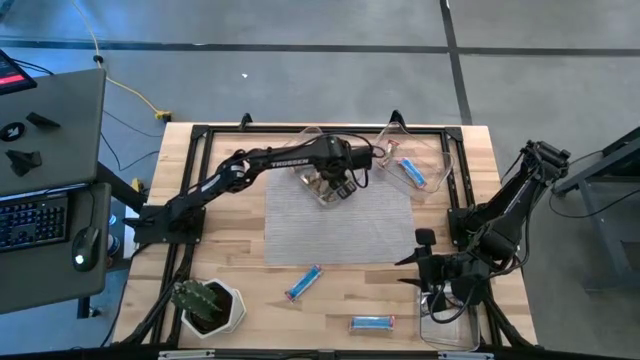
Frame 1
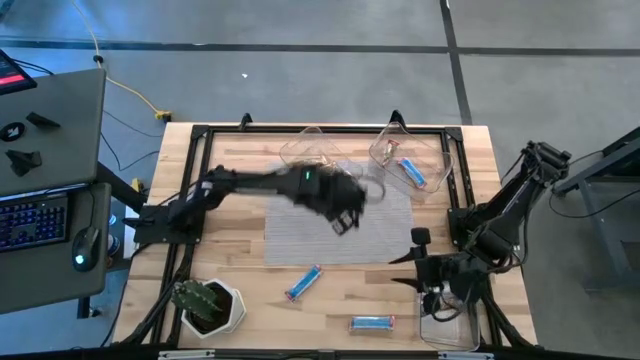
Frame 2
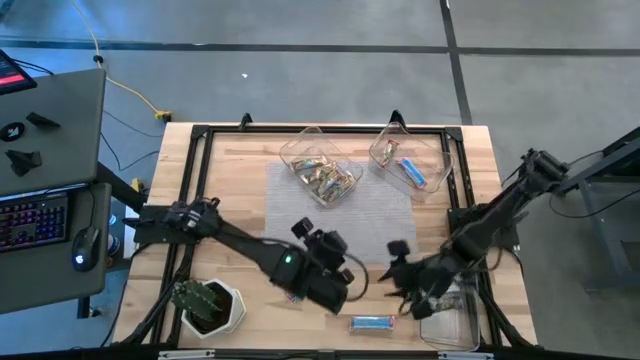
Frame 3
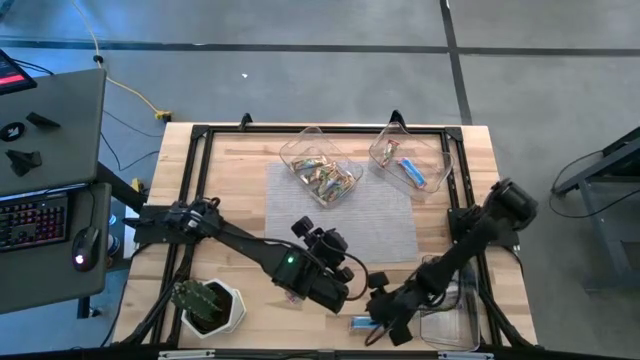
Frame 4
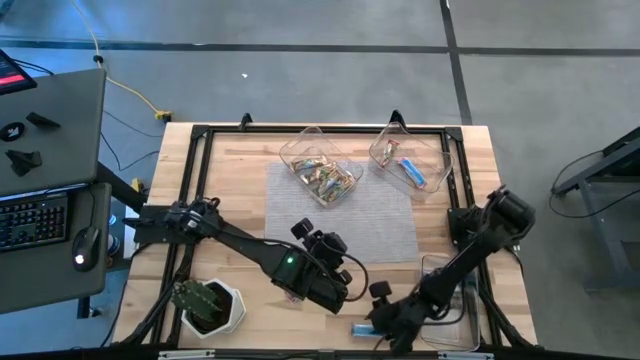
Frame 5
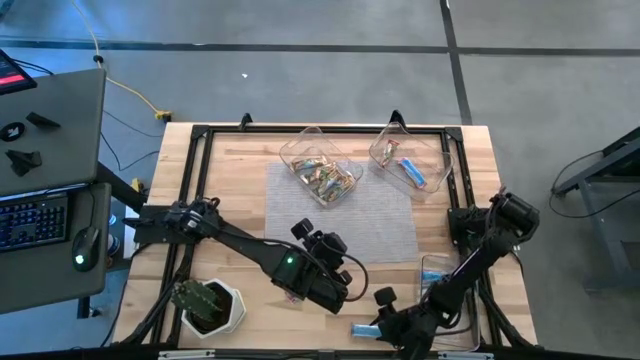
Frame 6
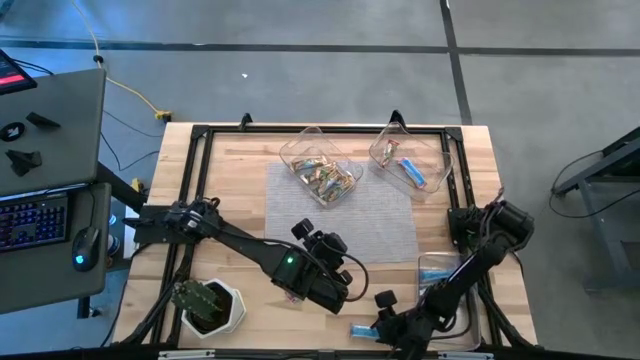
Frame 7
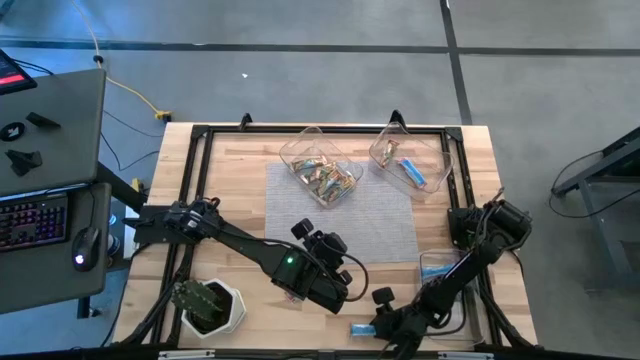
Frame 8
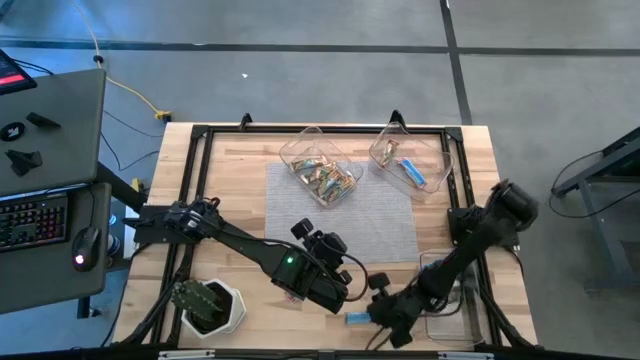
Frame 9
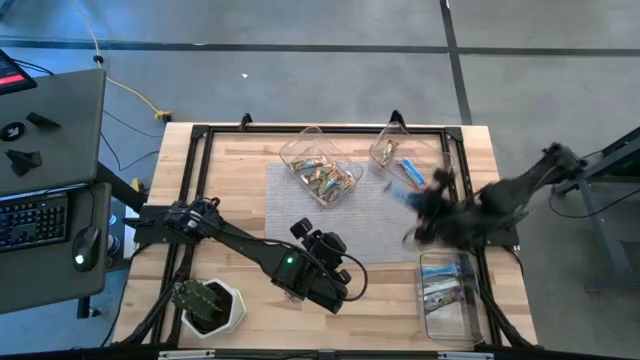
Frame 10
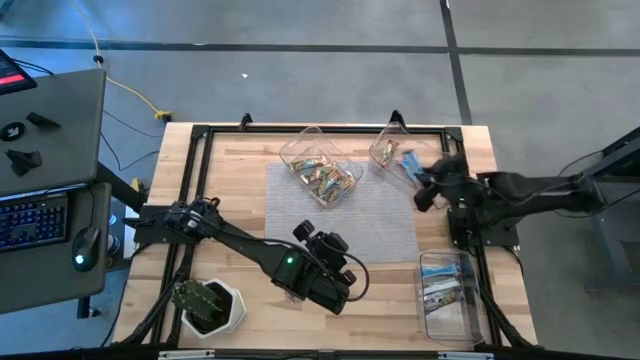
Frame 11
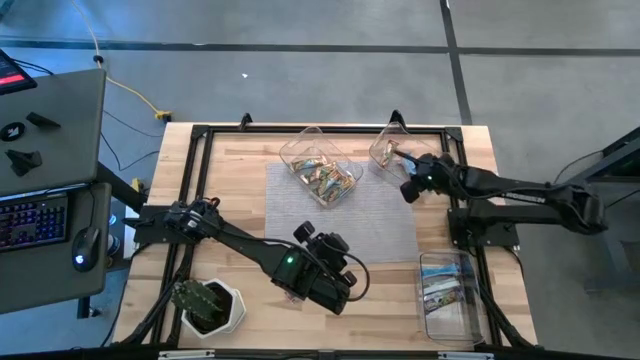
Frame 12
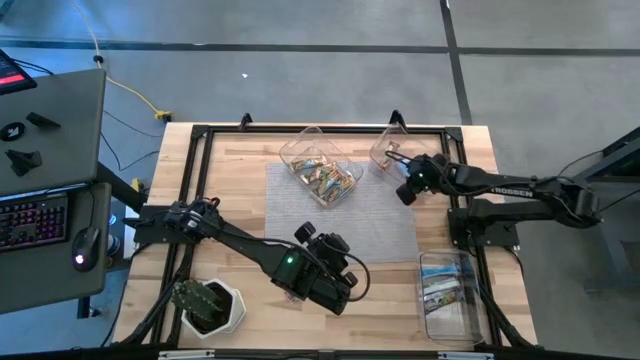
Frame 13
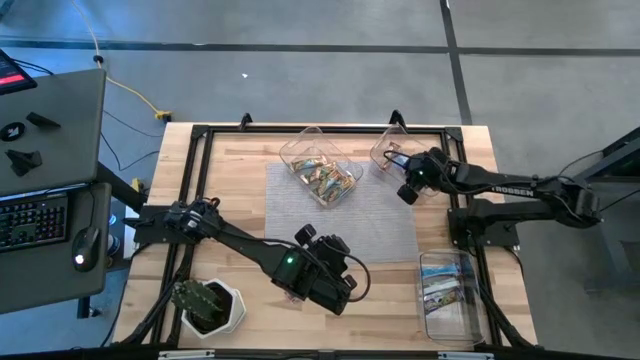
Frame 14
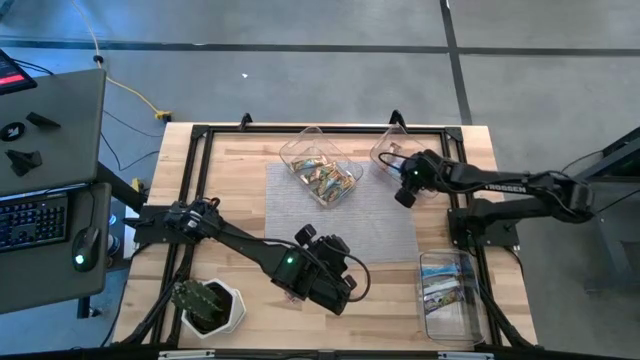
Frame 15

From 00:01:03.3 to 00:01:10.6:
Task: Pick and place Granola Bars by type
Put the red granola bar into the top right transparent bin

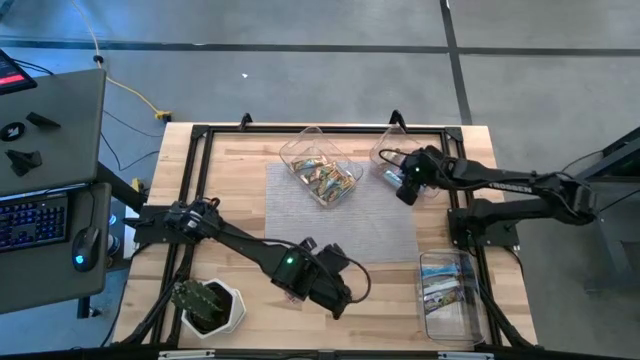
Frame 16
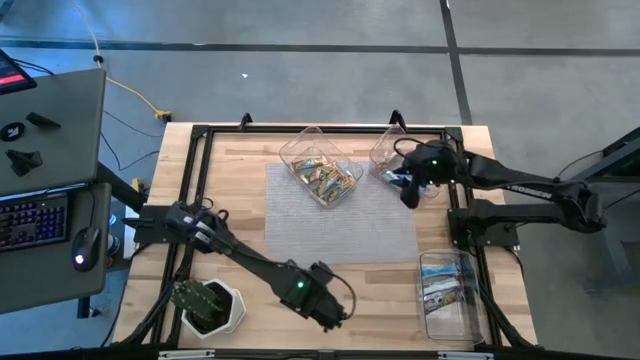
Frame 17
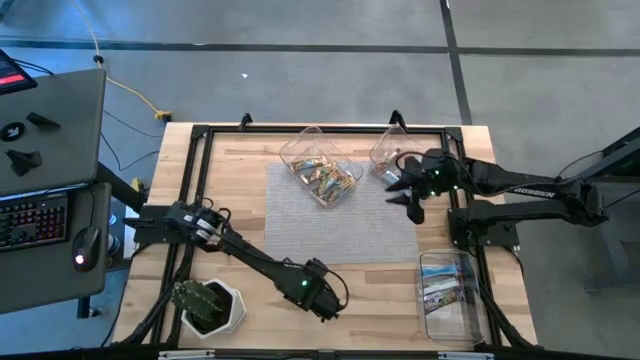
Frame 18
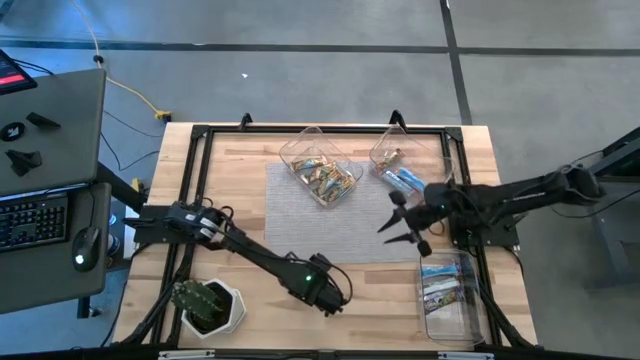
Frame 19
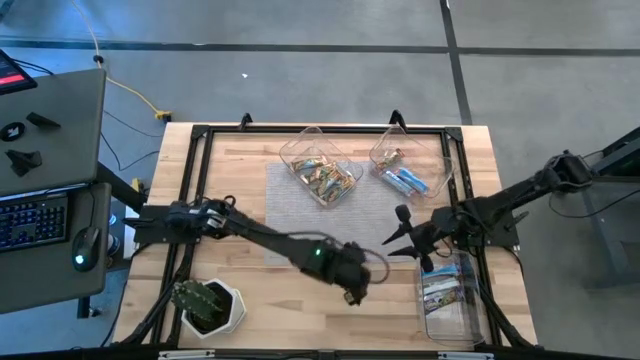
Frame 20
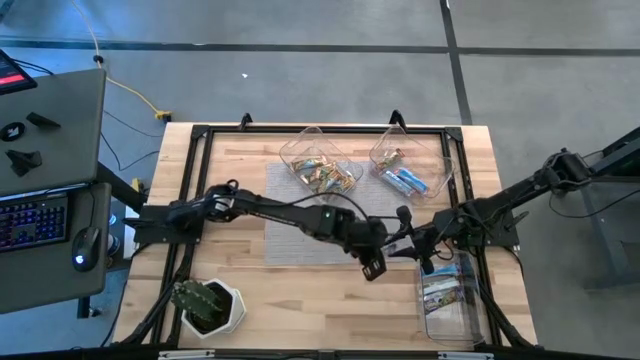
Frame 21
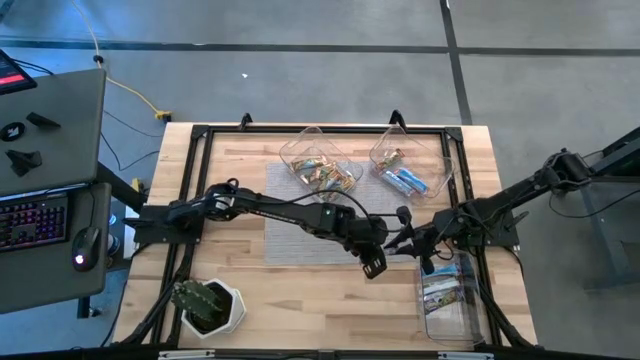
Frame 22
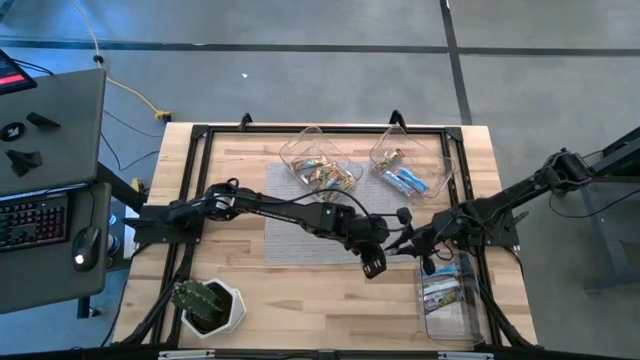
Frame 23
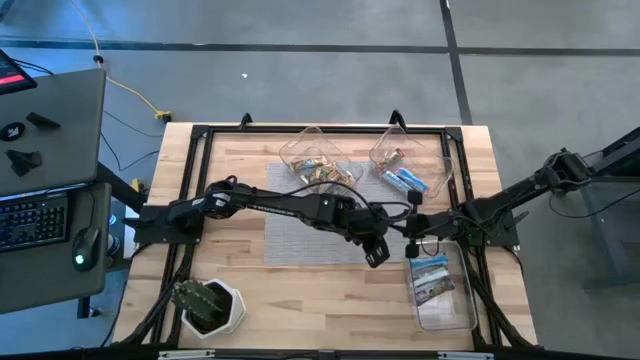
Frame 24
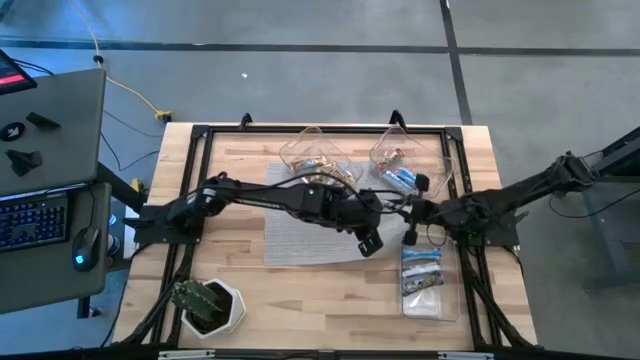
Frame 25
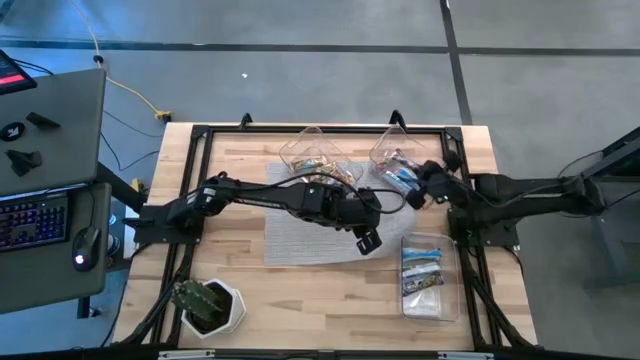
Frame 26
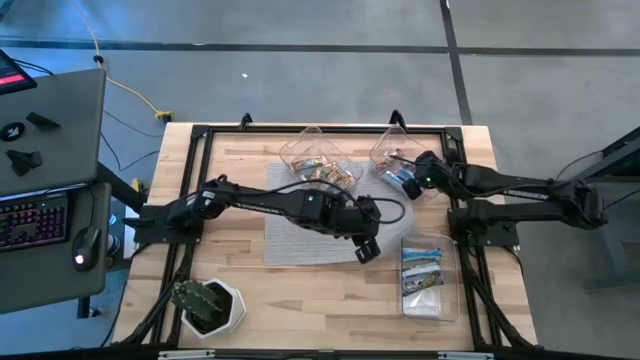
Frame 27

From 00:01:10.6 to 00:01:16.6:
Put the red granola bar into the top right transparent bin

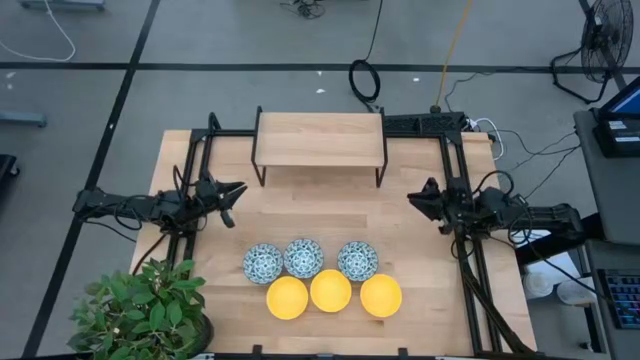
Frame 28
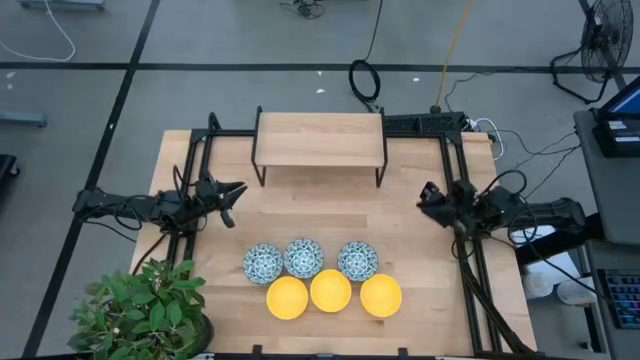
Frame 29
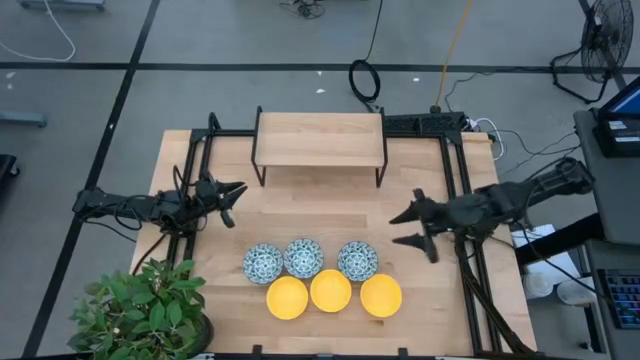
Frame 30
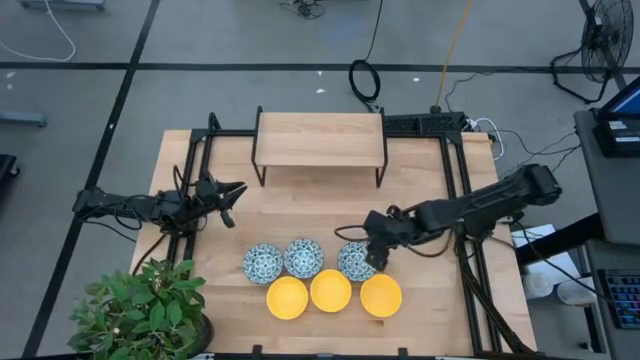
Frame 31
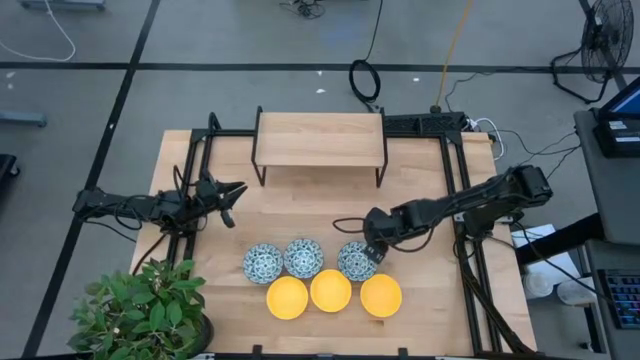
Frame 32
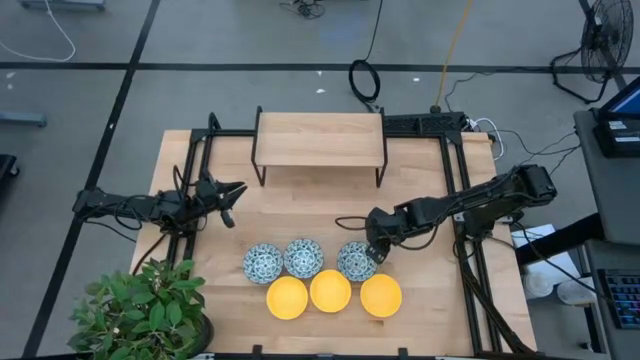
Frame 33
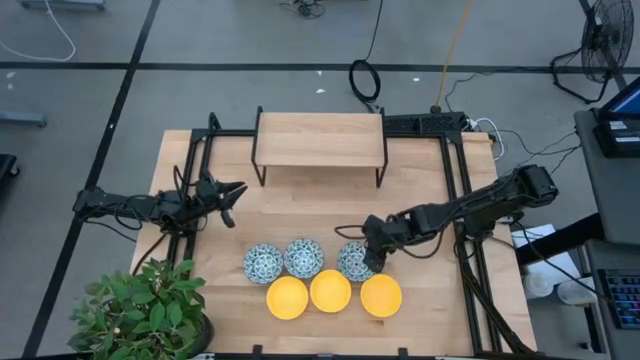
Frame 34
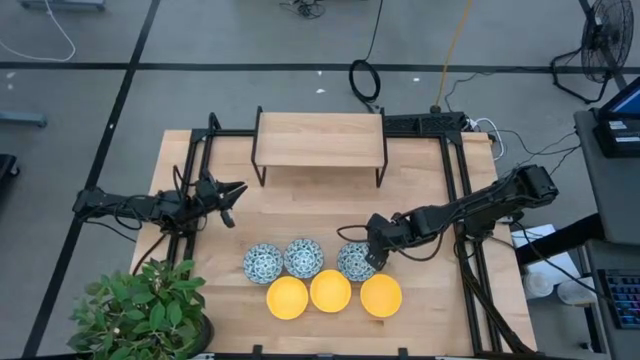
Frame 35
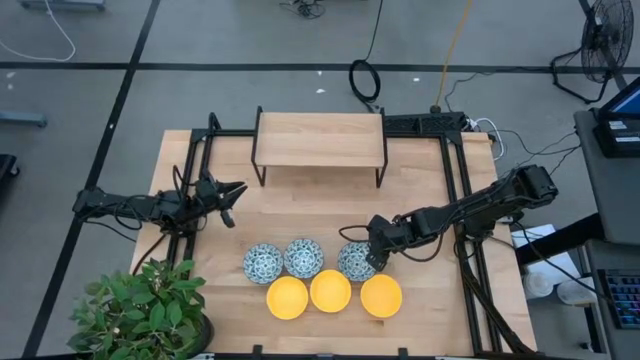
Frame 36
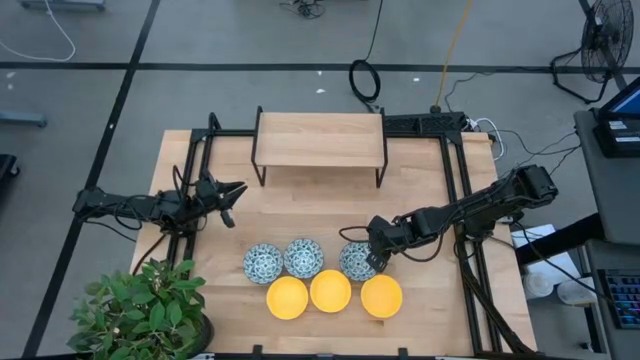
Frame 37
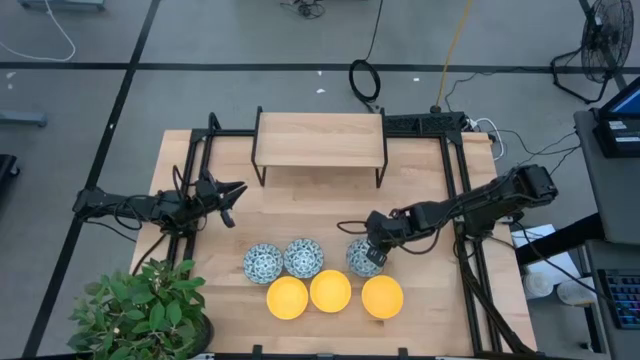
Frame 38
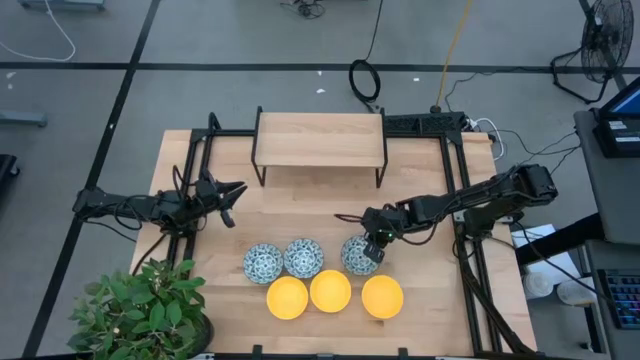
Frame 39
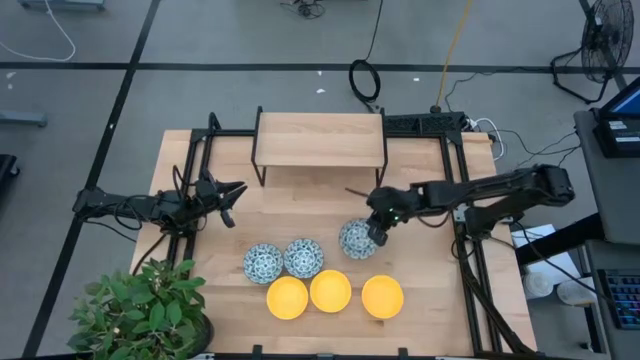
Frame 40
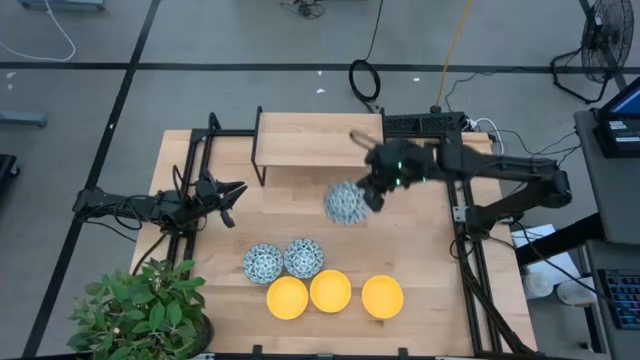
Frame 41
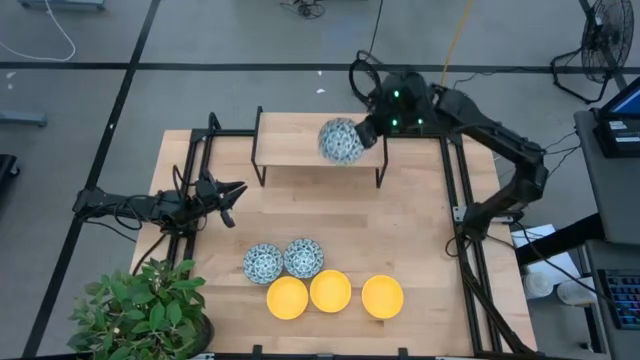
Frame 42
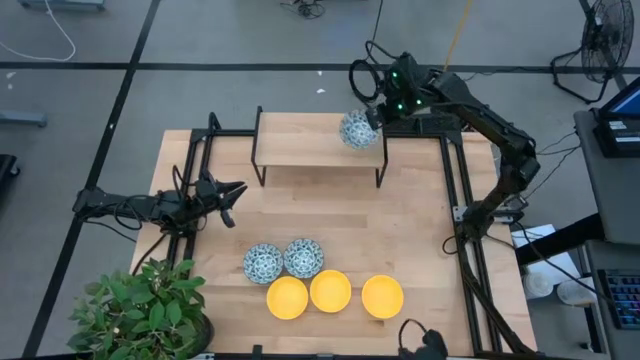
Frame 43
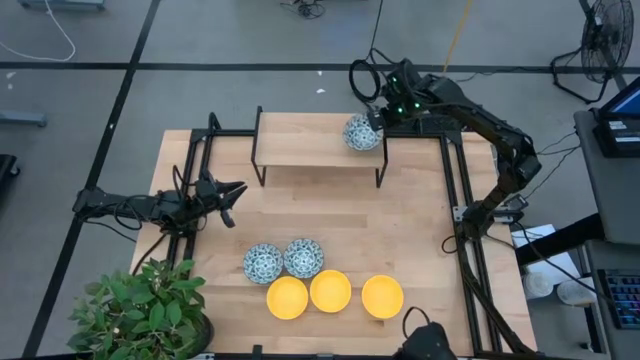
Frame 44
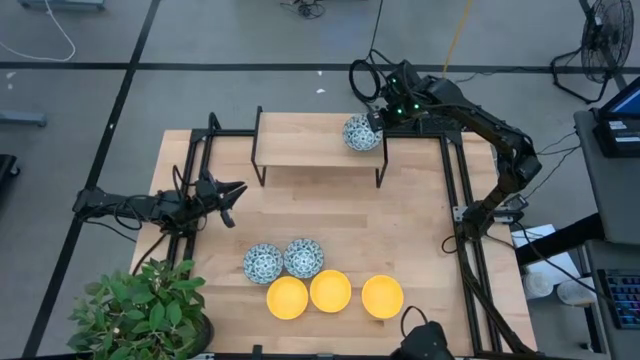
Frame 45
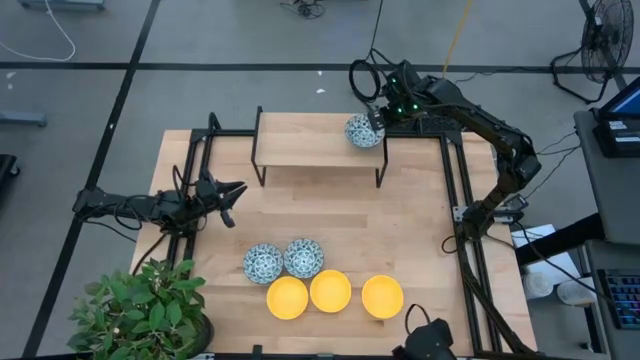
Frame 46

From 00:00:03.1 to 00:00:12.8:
Task: Pick & Place Mini bowls
Put the right blue bowl on the shelf
